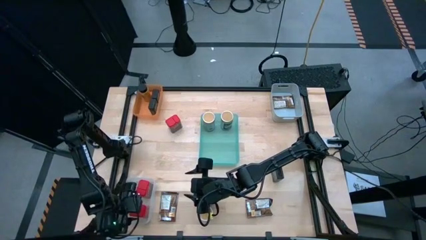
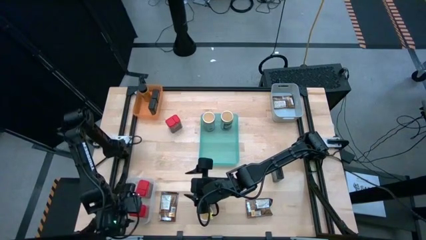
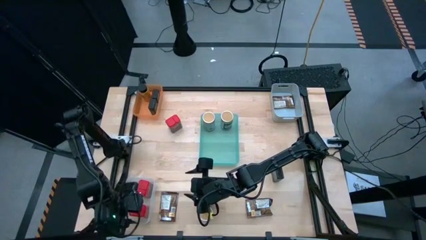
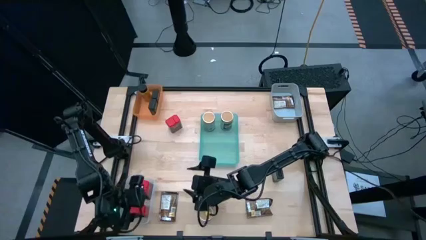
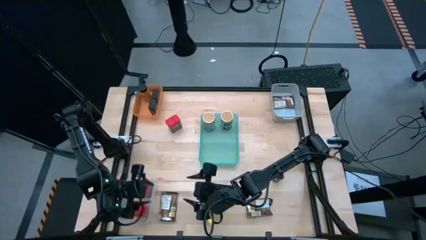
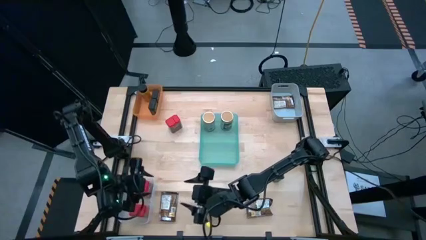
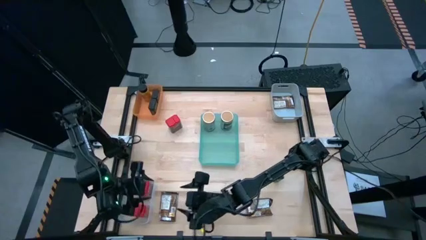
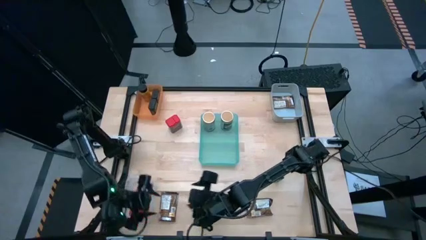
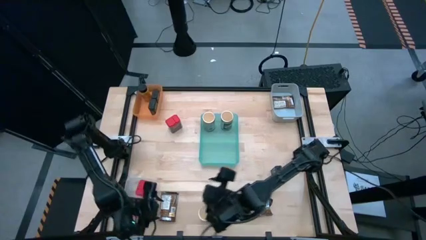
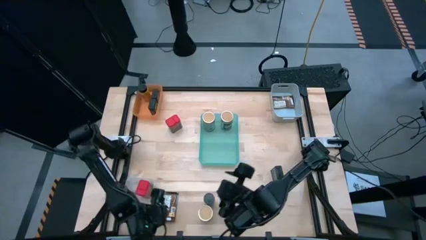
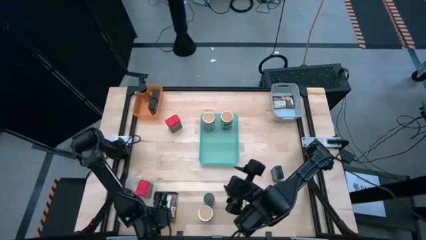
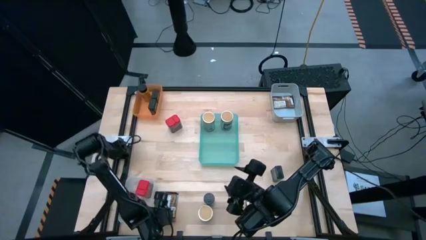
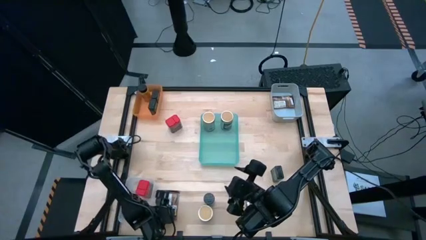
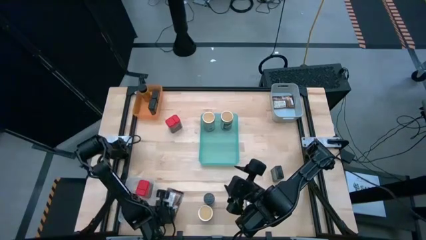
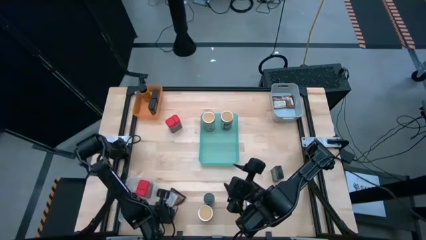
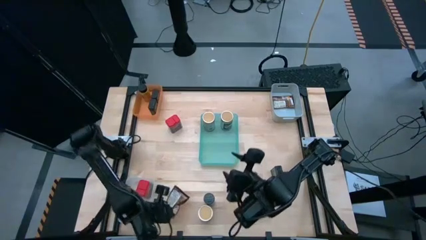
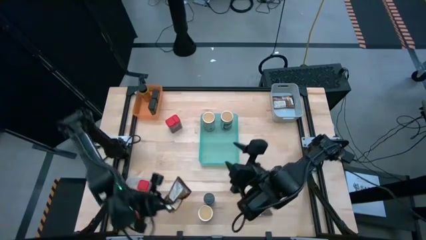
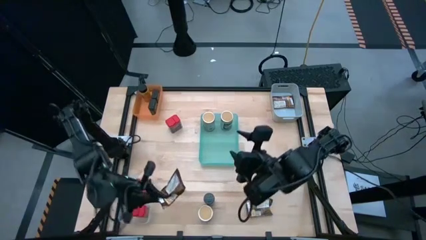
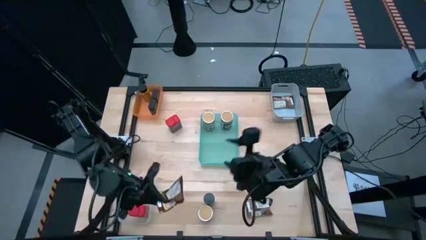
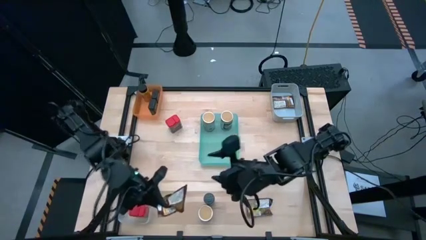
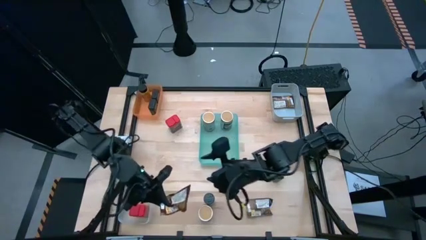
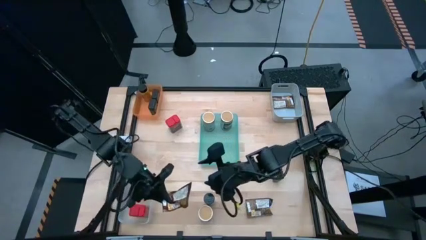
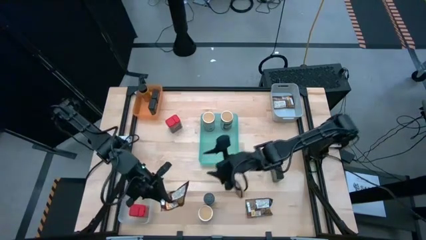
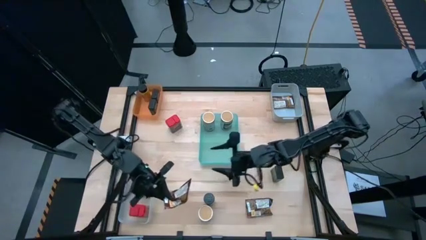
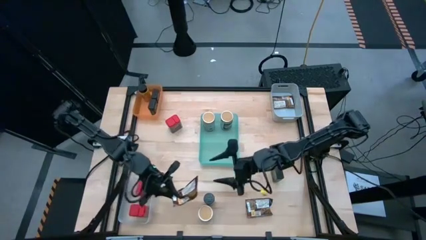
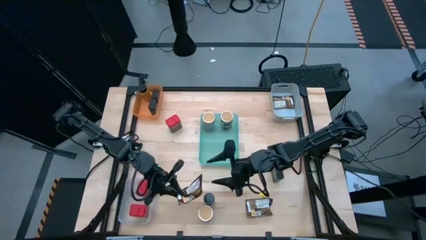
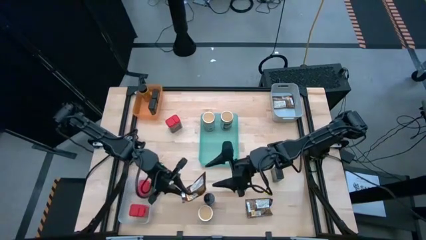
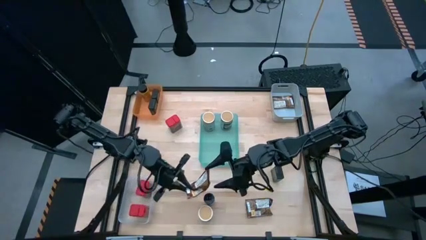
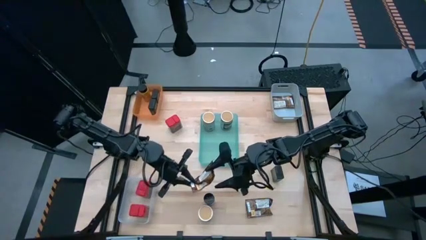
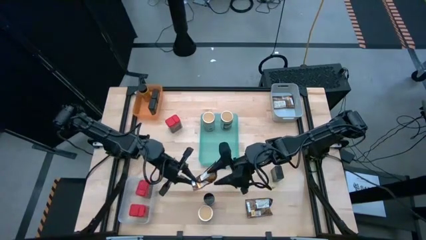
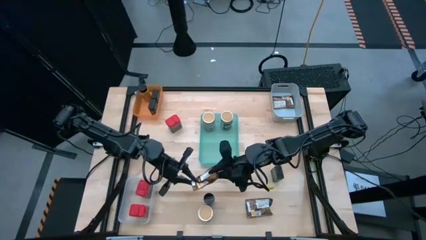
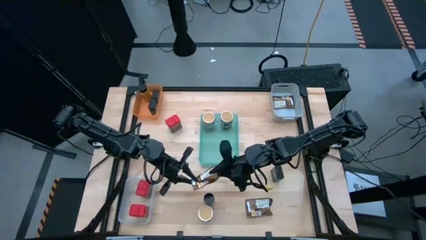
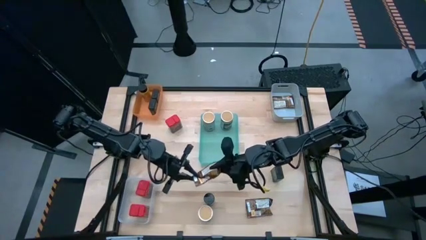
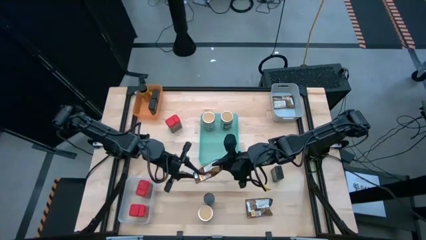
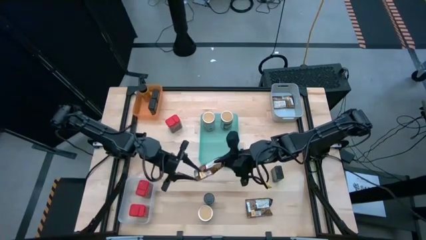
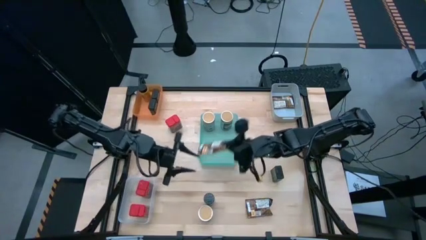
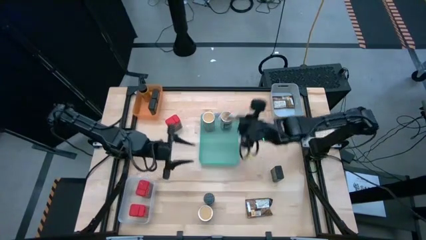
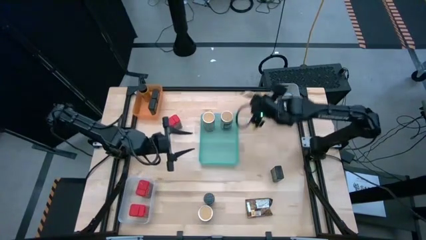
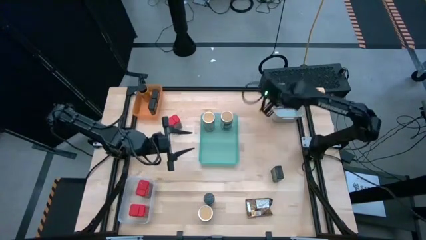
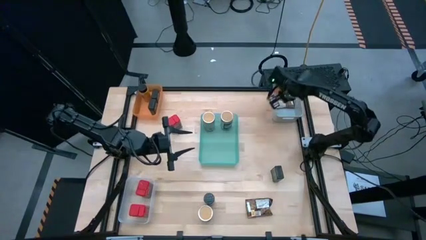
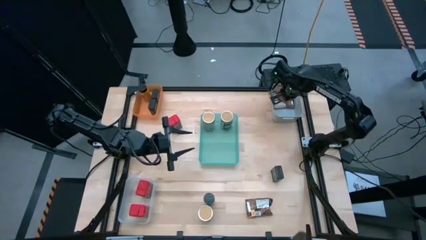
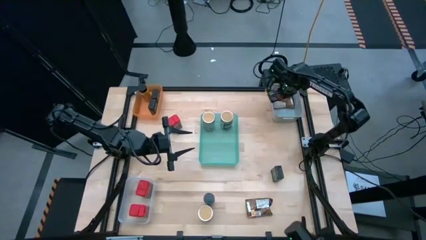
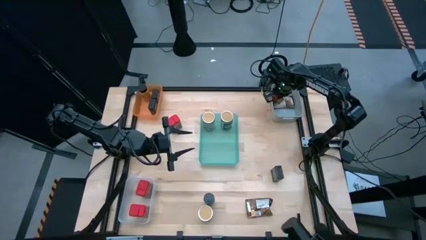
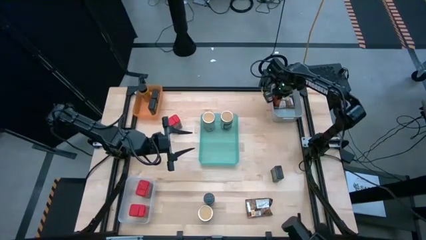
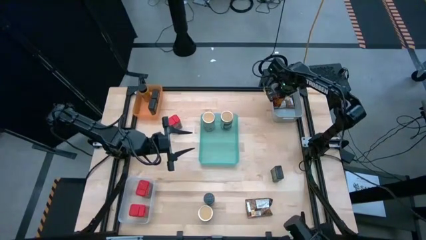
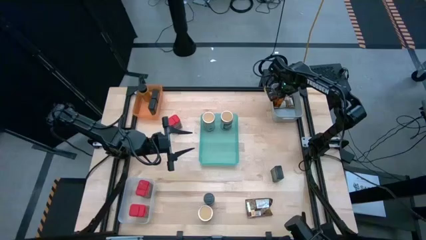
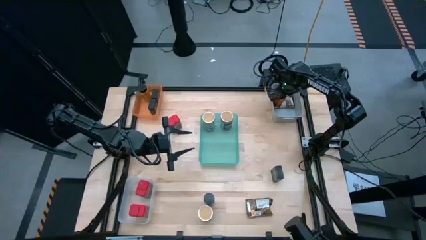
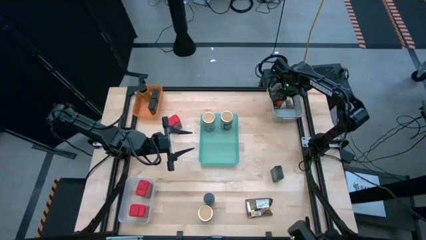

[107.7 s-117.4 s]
Task: Sort spices by type
Put the left orange seasoning pack into the gray bin
